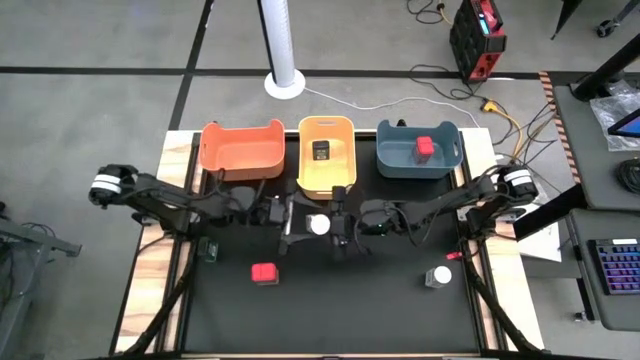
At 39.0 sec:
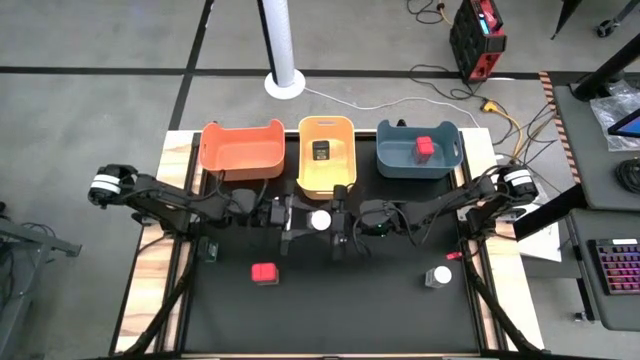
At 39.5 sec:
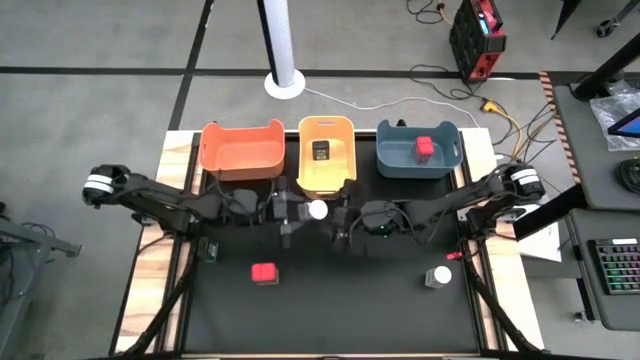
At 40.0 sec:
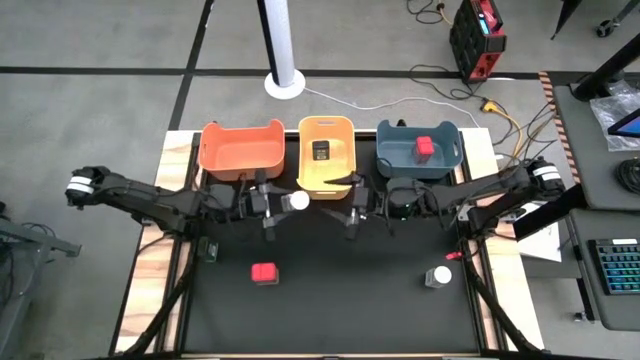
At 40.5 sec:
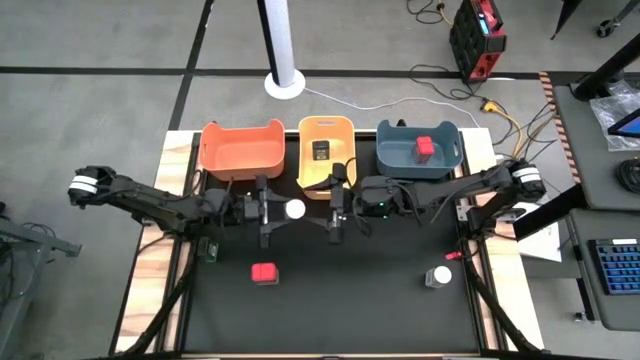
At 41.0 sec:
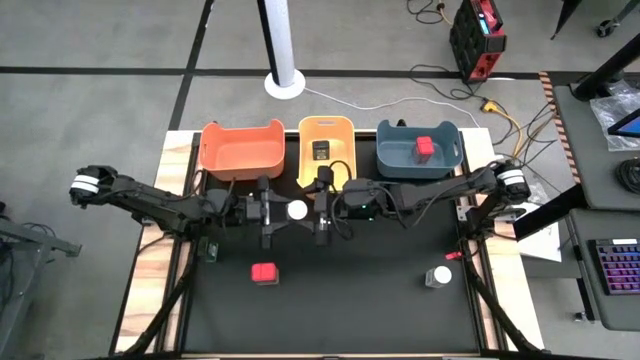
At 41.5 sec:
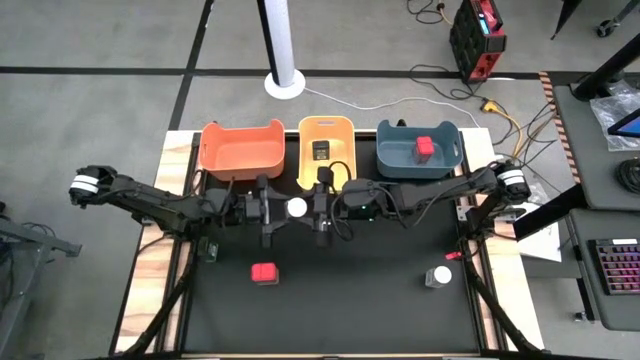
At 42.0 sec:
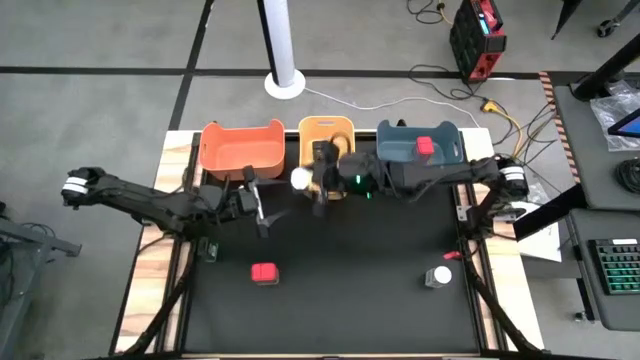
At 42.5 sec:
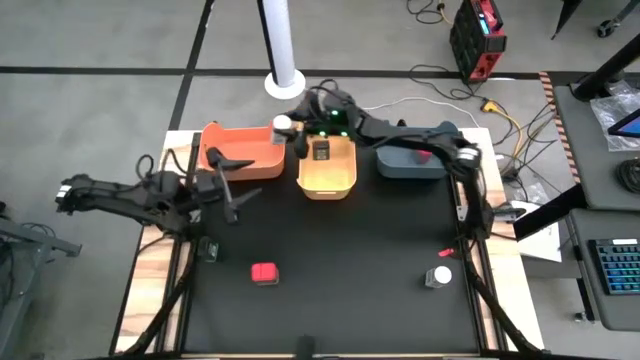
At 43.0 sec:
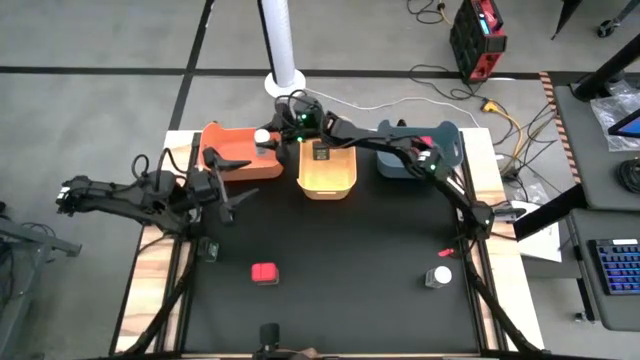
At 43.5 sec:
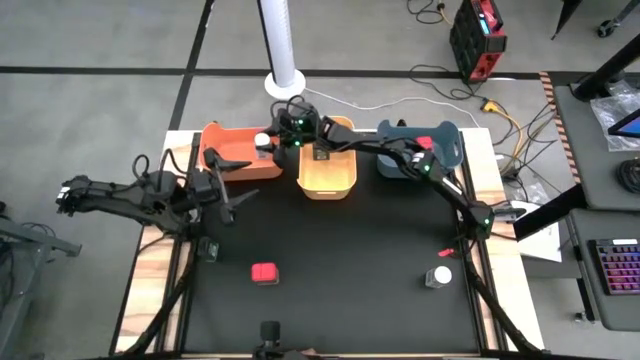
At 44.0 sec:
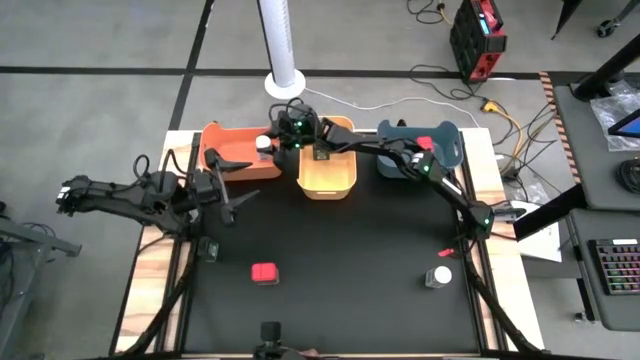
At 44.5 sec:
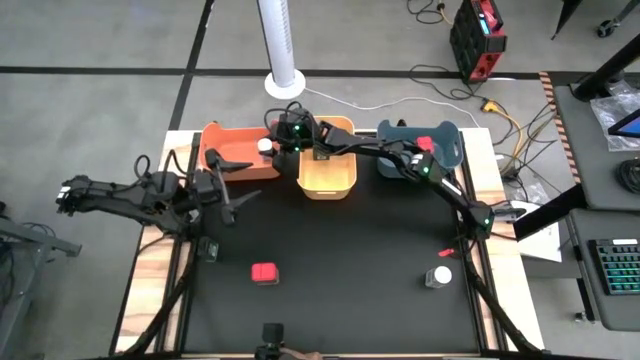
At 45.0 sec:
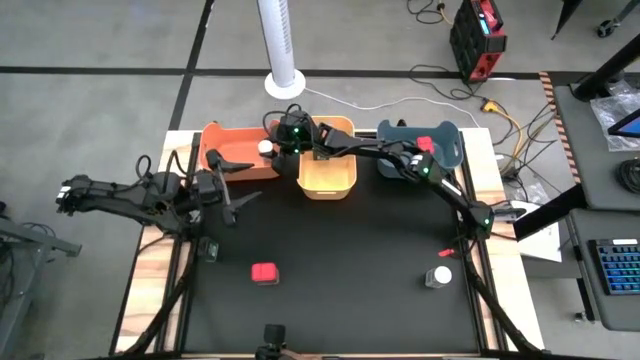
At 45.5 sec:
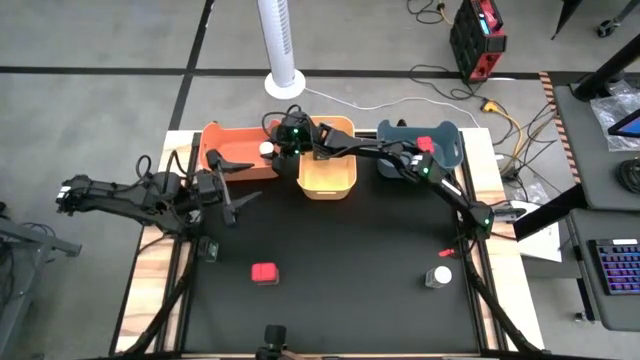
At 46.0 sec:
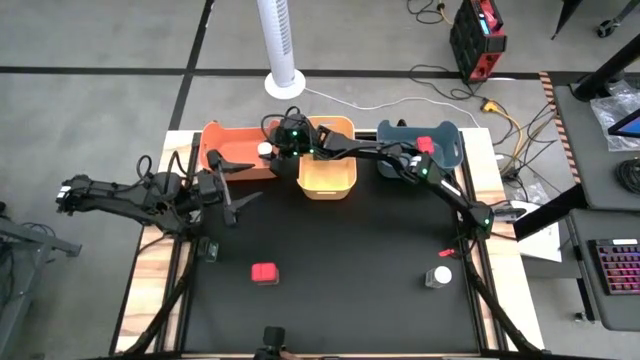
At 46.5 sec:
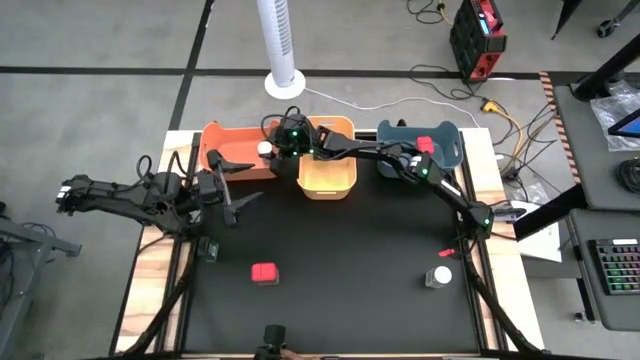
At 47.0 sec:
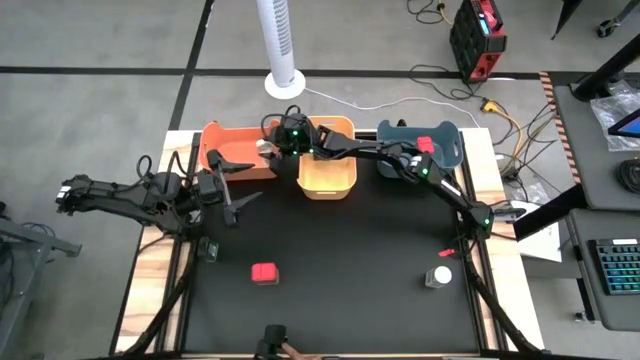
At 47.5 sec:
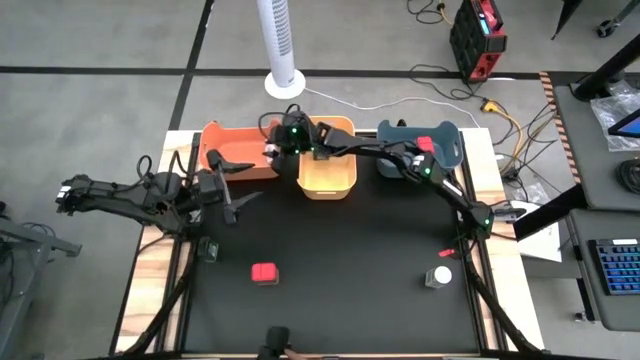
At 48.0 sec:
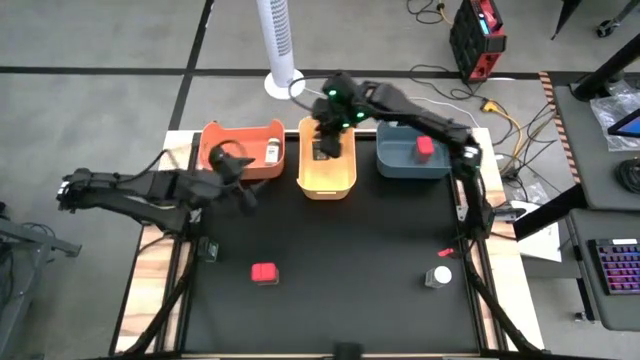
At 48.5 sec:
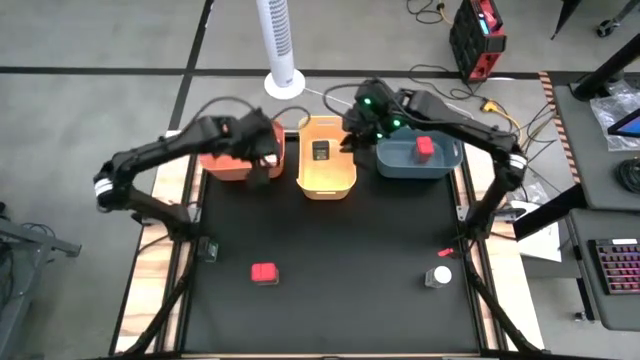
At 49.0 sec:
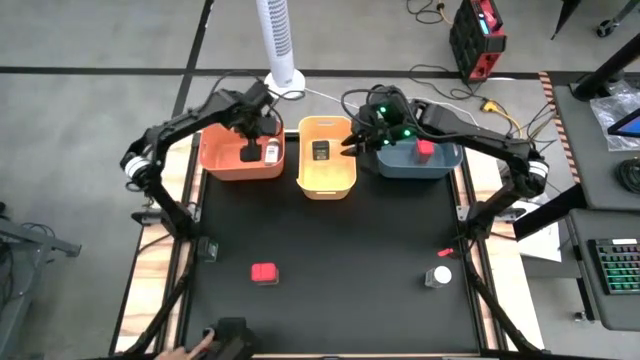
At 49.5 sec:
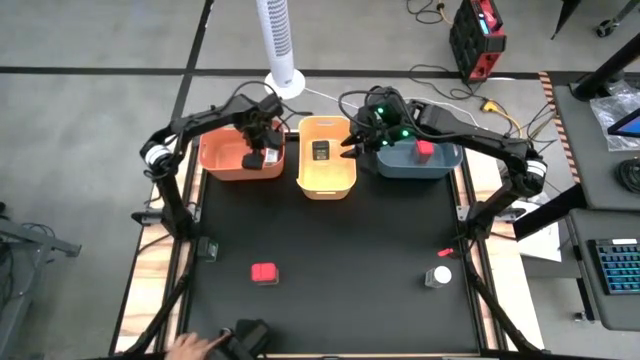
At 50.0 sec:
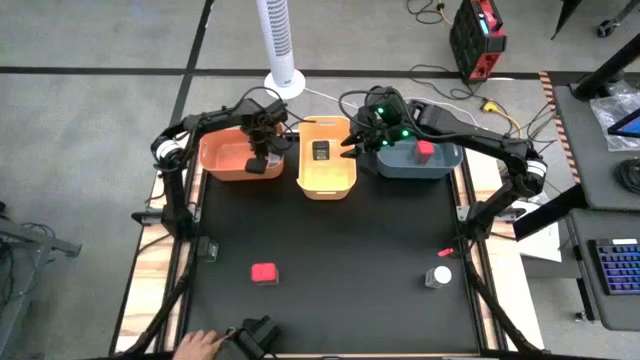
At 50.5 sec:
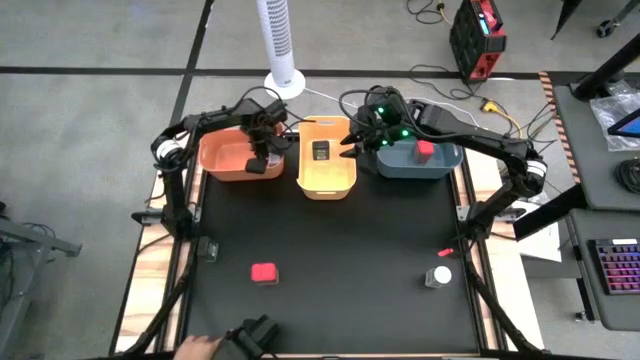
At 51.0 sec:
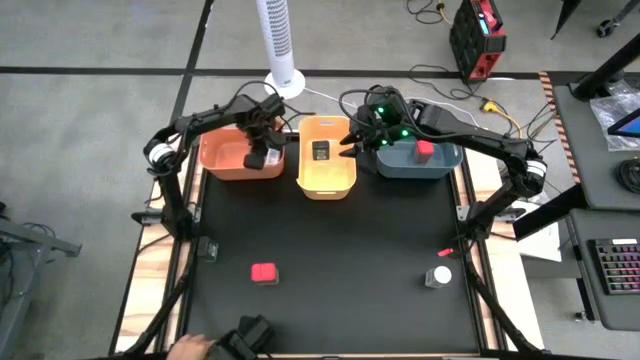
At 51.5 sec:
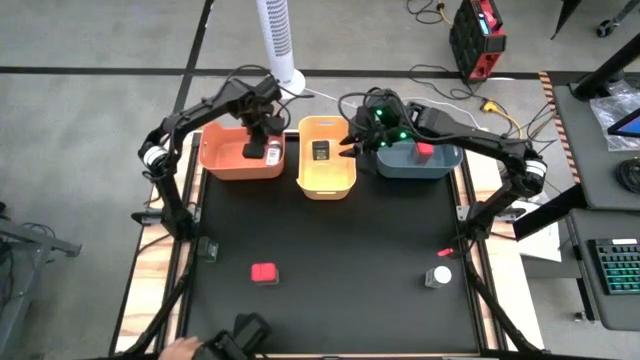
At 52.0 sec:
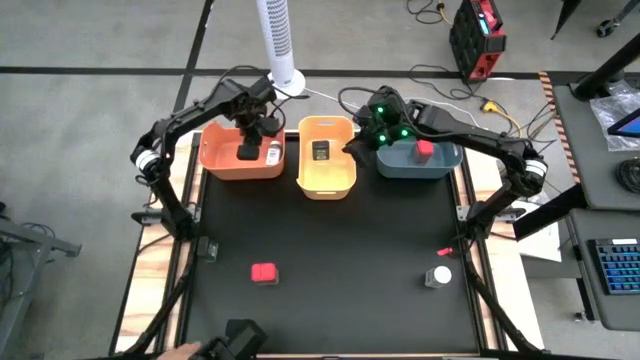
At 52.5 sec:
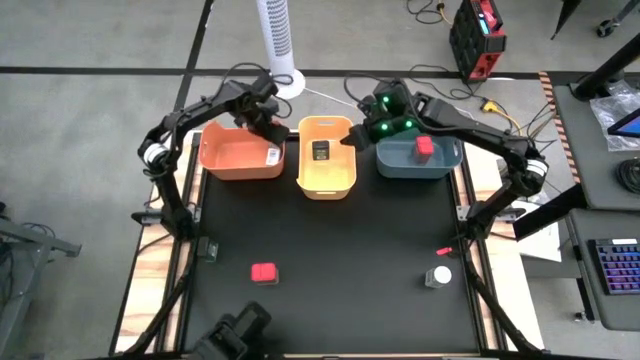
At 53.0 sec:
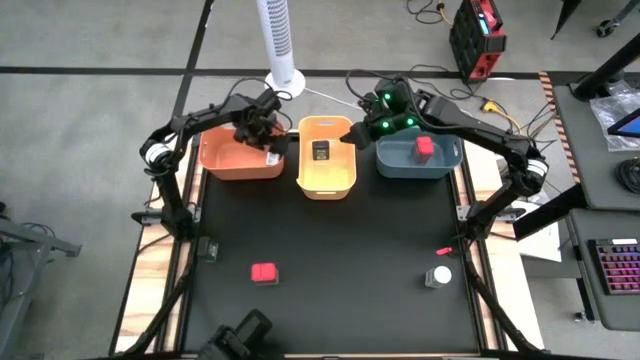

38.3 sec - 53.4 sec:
Task: Sort spices by type
Put the left white spice bottle into the orange bin

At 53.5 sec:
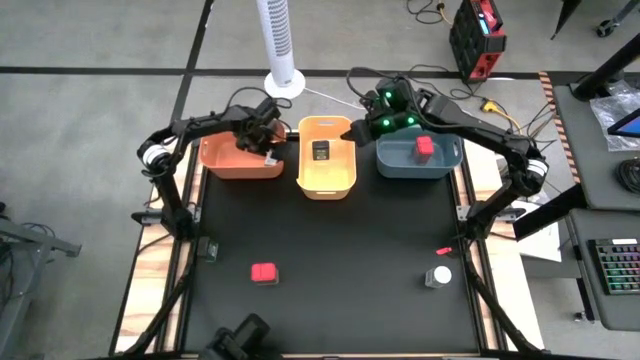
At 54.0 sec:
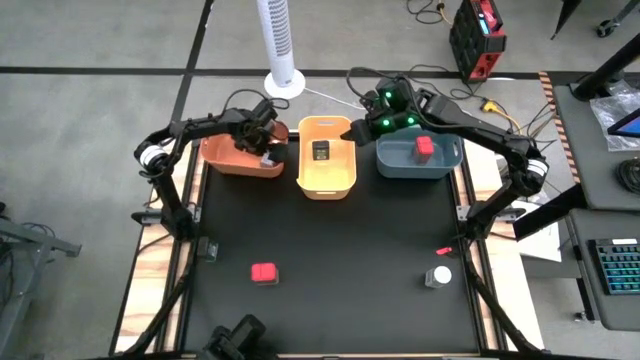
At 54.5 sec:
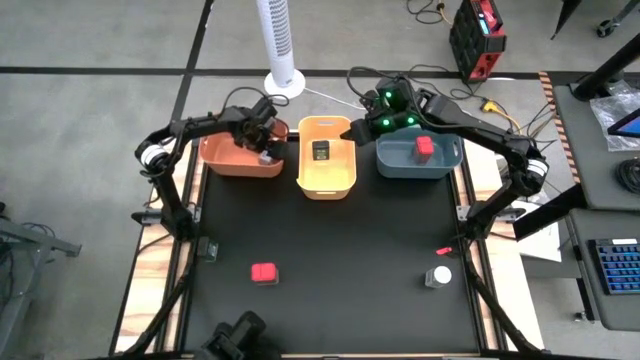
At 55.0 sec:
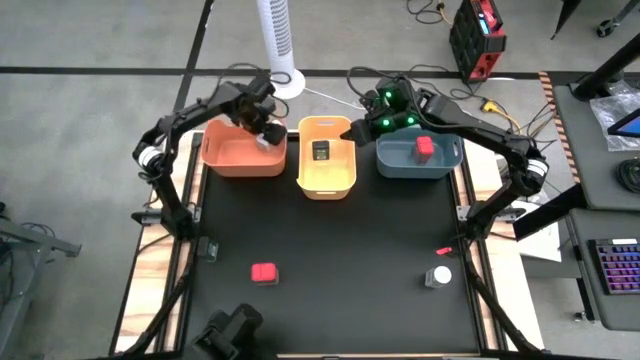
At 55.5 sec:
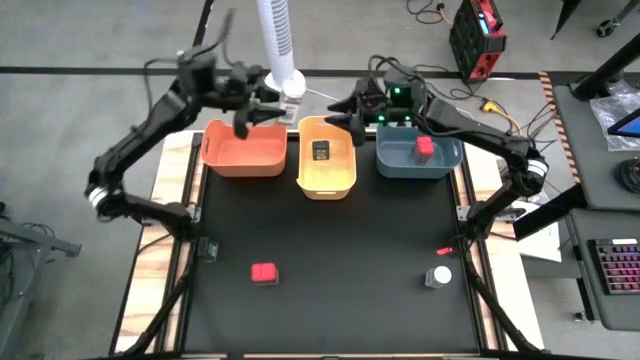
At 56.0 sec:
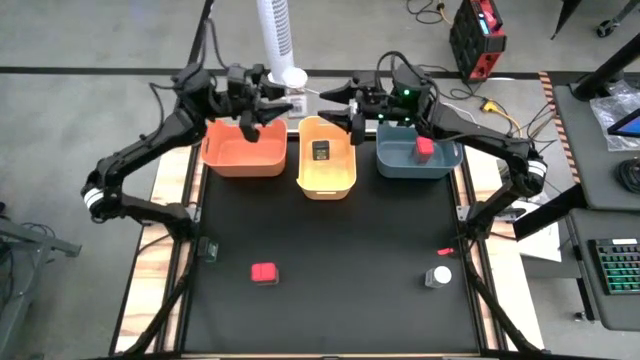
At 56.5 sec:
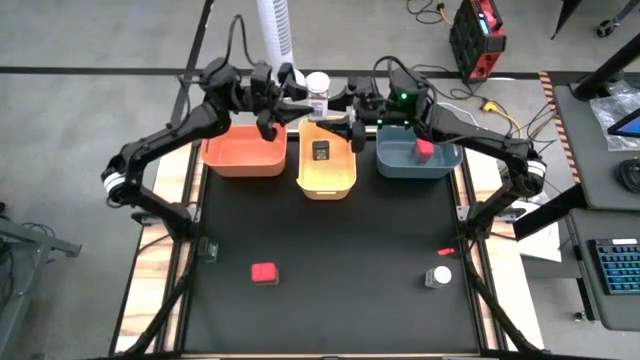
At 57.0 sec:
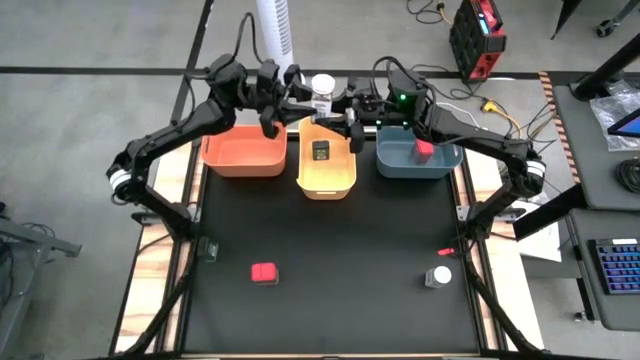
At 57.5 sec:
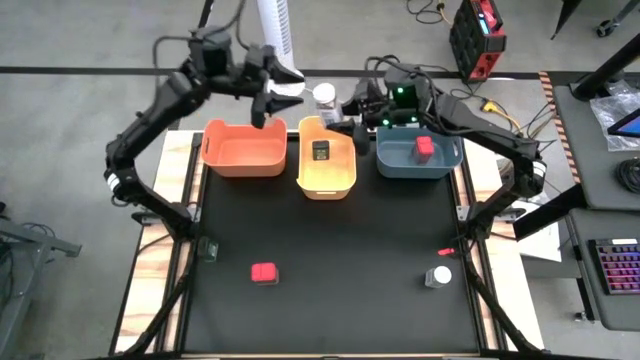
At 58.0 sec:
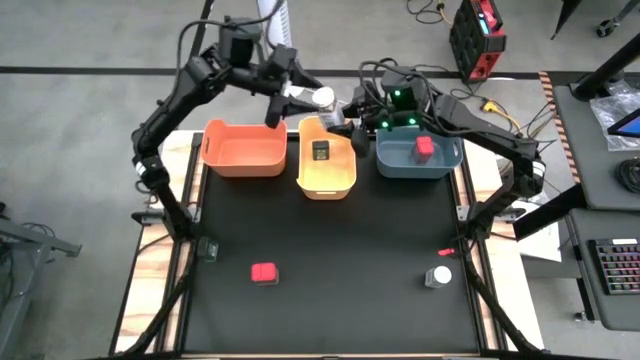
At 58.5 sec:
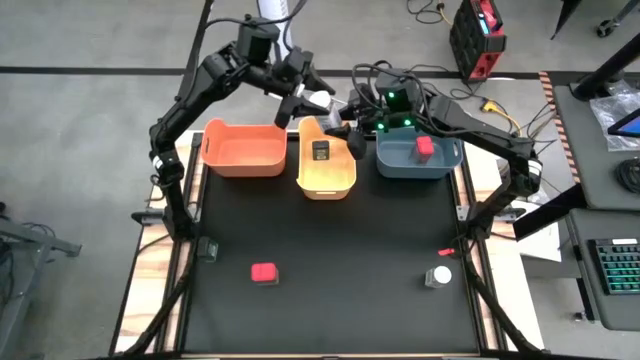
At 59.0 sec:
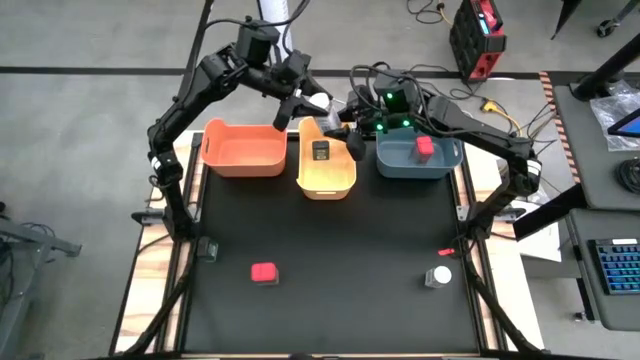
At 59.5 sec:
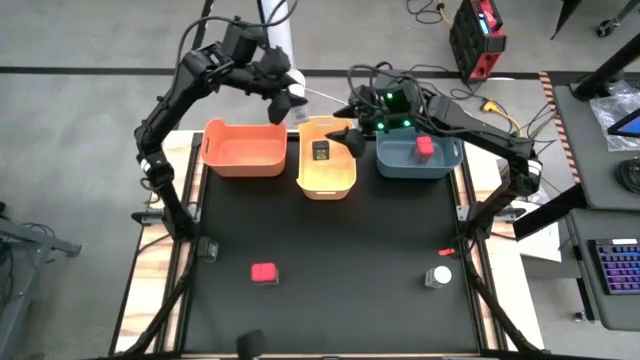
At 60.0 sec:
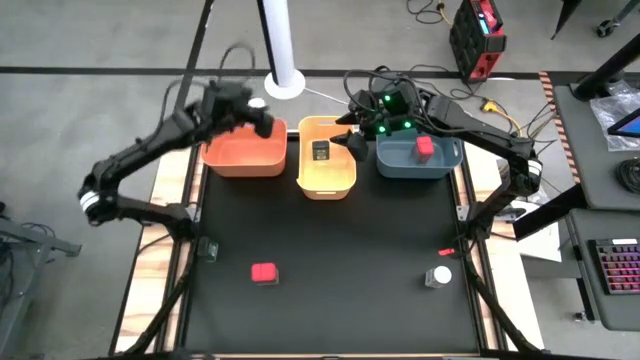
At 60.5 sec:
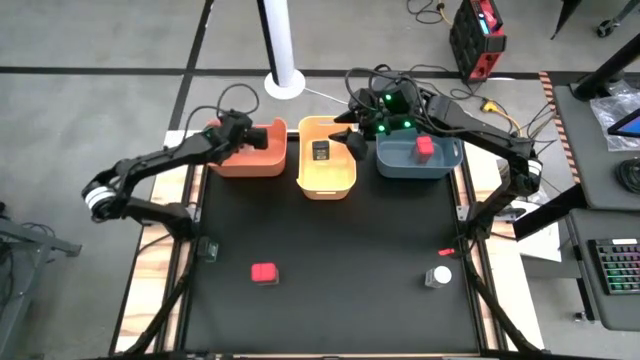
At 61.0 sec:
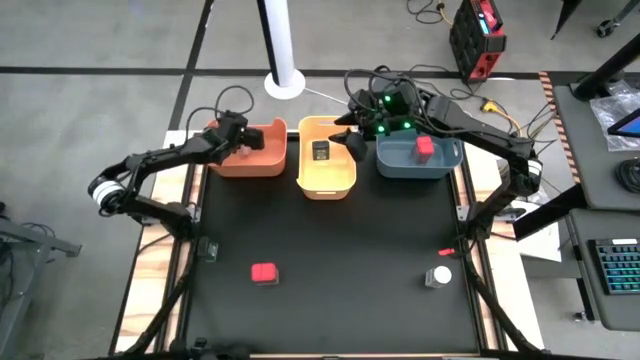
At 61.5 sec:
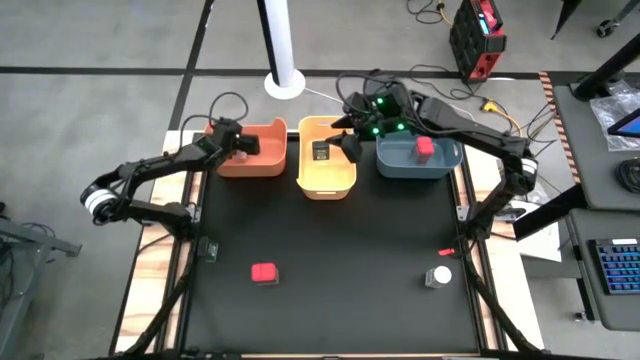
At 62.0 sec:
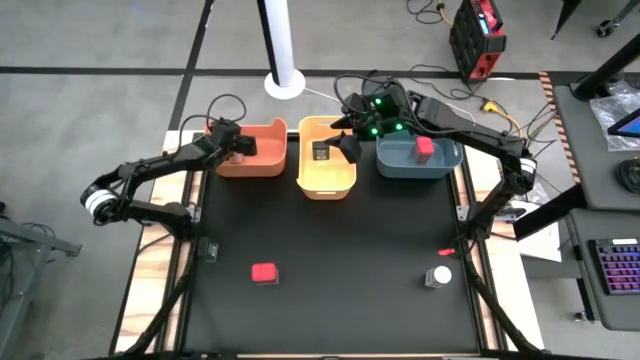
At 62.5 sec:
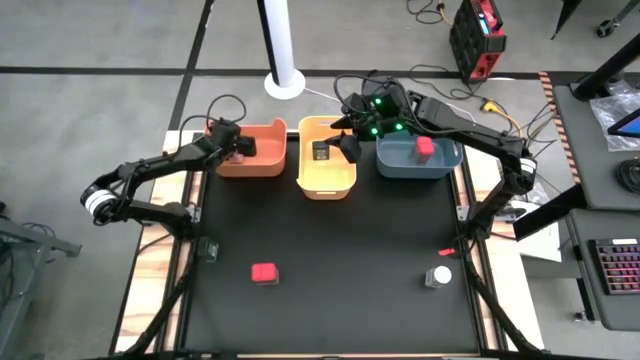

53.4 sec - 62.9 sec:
Put the left white spice bottle into the orange bin
